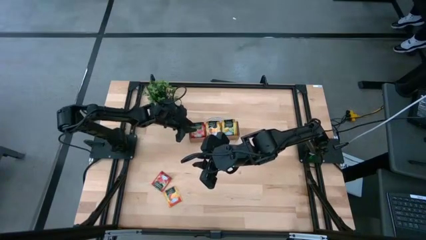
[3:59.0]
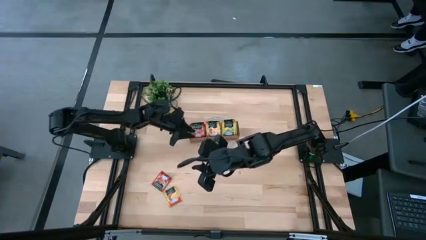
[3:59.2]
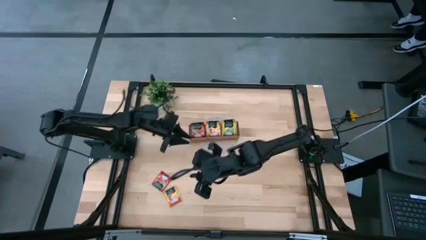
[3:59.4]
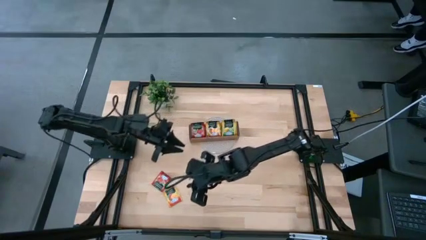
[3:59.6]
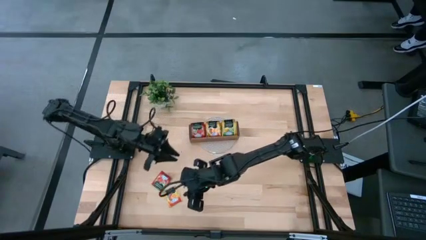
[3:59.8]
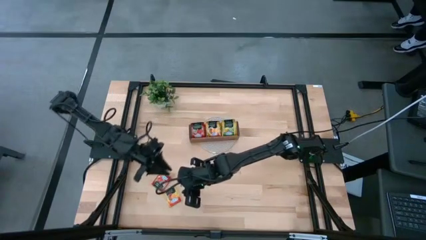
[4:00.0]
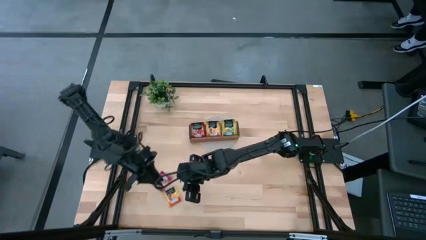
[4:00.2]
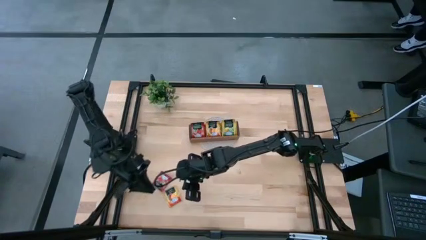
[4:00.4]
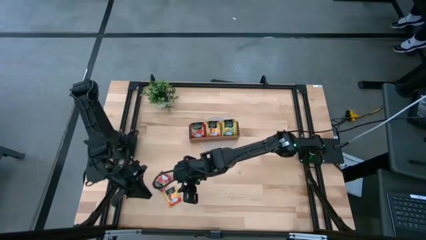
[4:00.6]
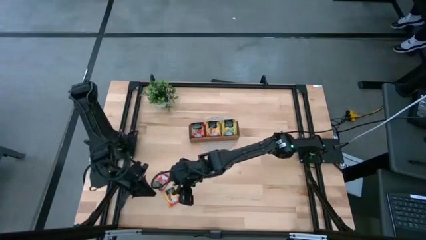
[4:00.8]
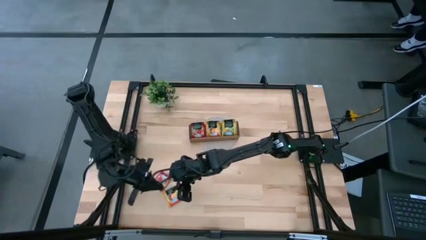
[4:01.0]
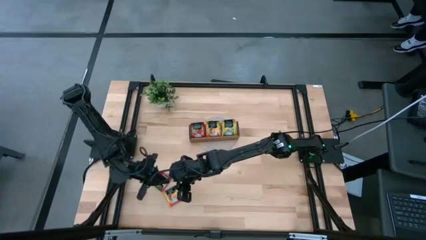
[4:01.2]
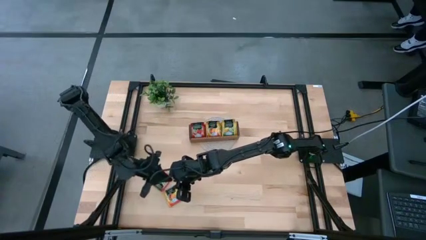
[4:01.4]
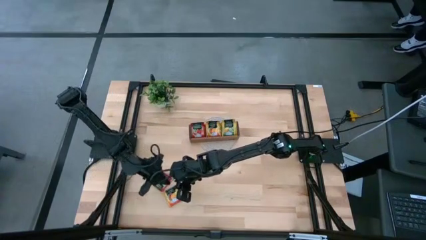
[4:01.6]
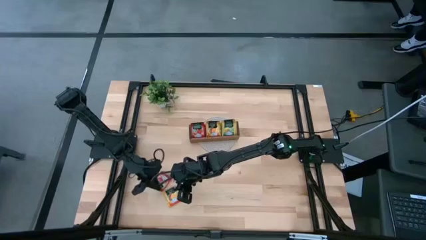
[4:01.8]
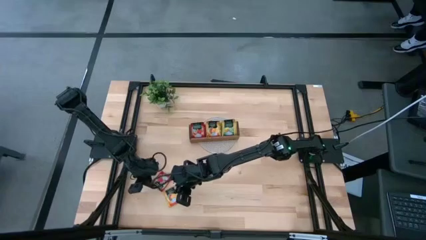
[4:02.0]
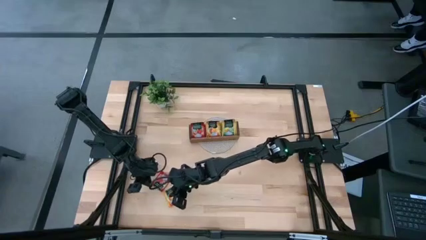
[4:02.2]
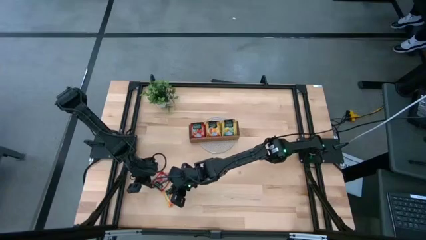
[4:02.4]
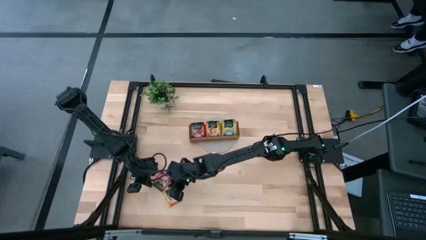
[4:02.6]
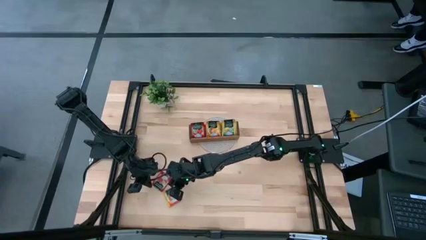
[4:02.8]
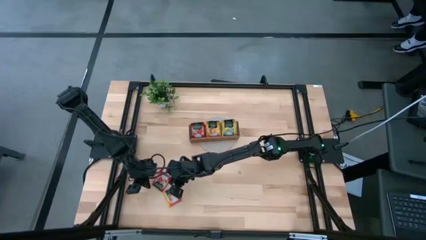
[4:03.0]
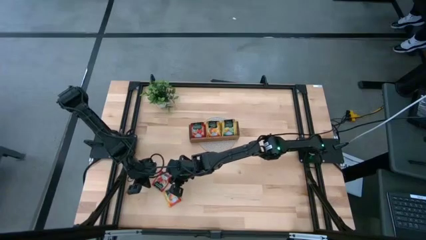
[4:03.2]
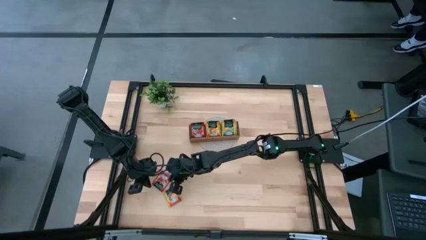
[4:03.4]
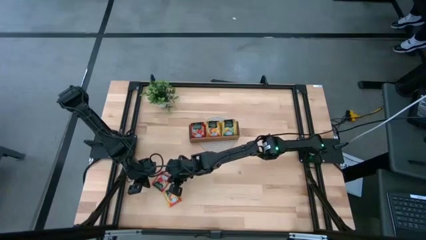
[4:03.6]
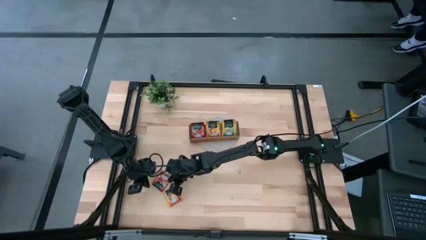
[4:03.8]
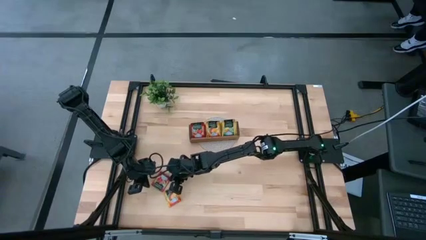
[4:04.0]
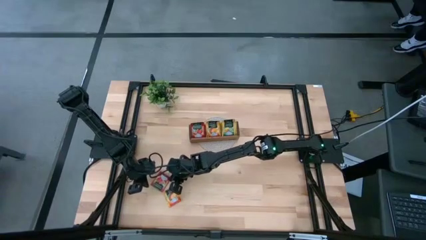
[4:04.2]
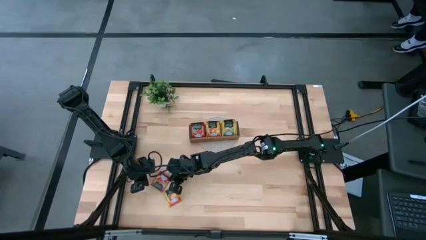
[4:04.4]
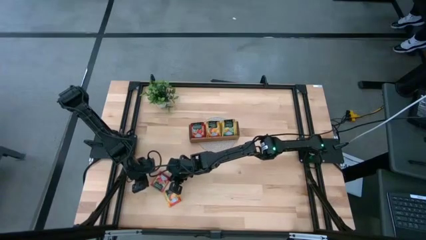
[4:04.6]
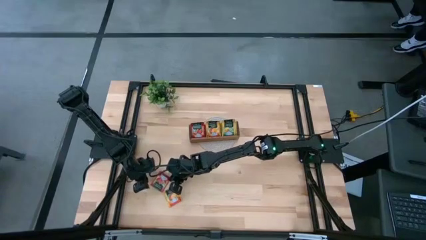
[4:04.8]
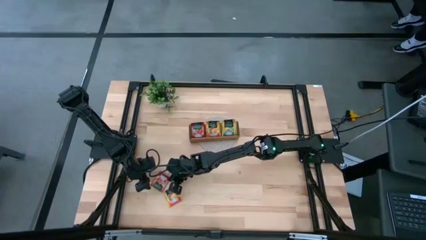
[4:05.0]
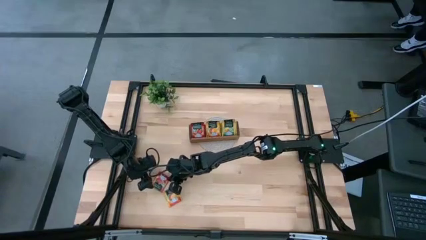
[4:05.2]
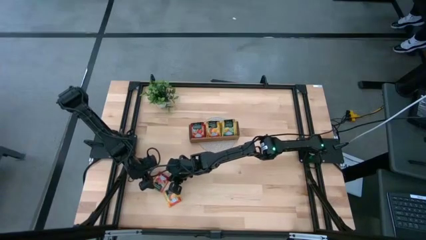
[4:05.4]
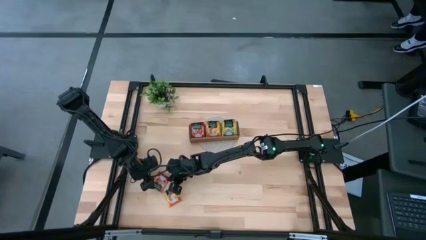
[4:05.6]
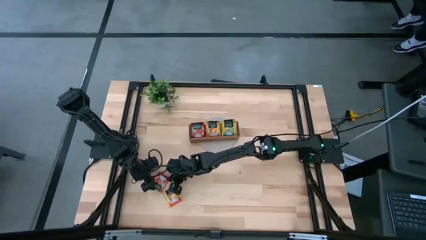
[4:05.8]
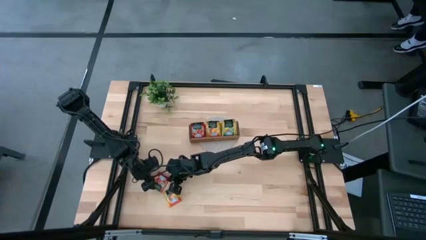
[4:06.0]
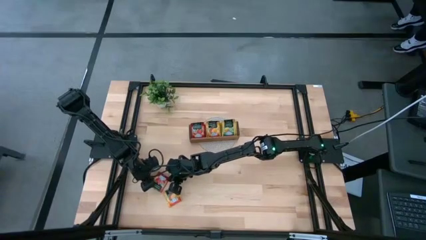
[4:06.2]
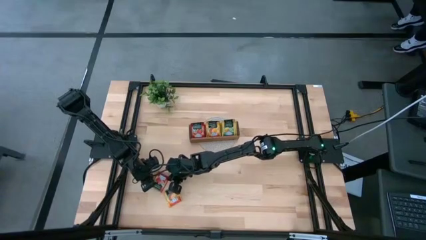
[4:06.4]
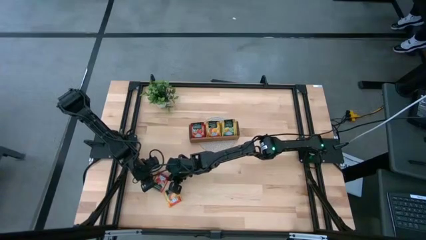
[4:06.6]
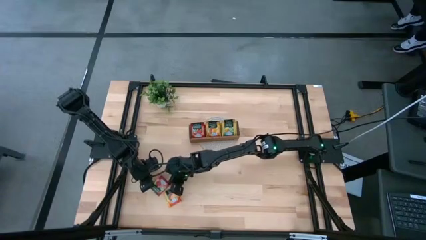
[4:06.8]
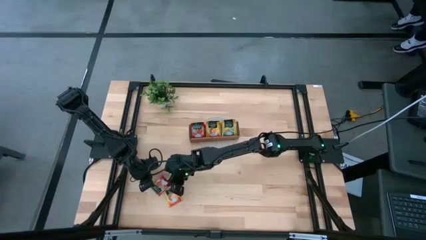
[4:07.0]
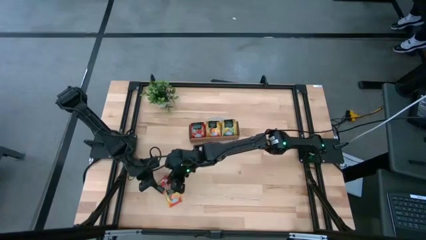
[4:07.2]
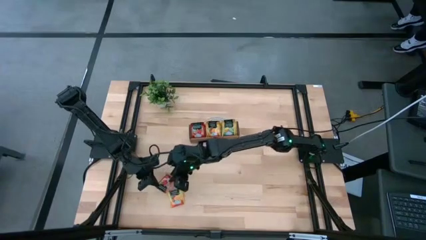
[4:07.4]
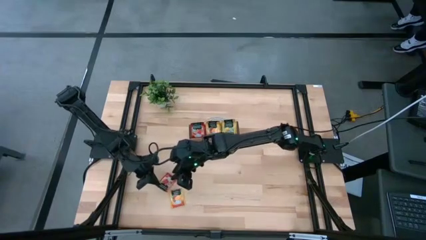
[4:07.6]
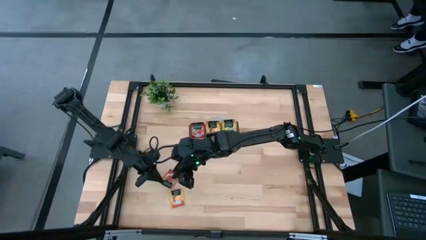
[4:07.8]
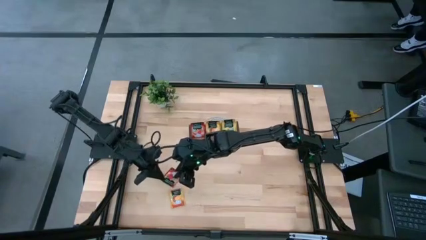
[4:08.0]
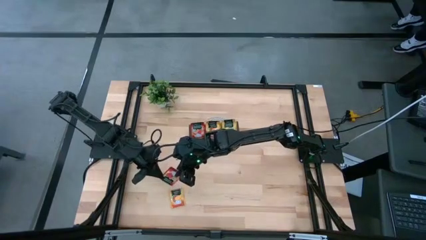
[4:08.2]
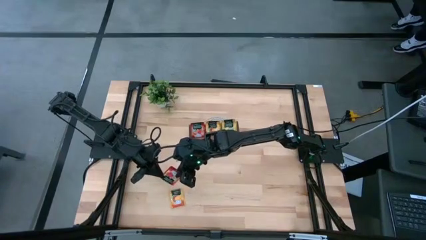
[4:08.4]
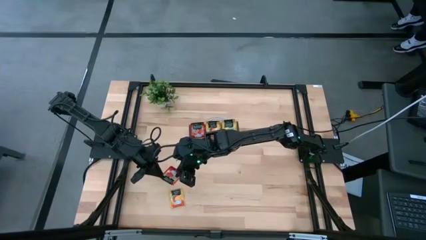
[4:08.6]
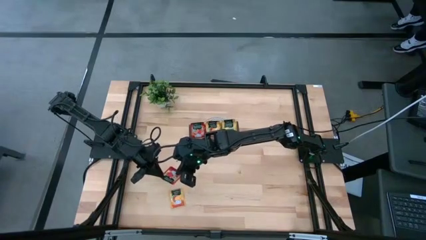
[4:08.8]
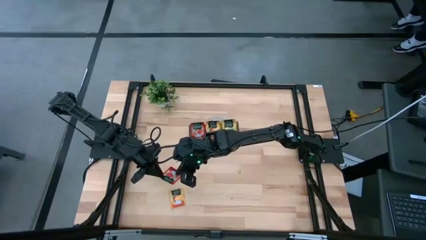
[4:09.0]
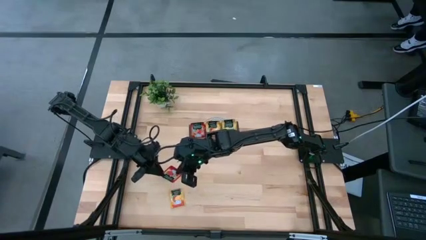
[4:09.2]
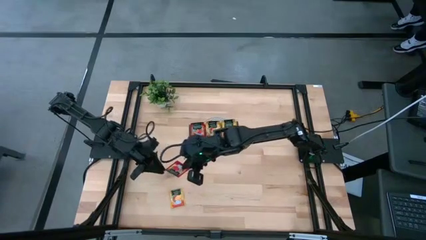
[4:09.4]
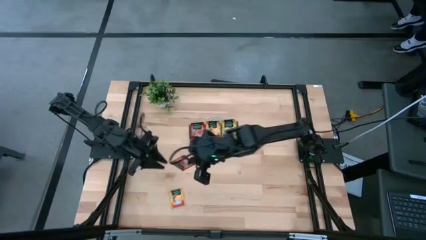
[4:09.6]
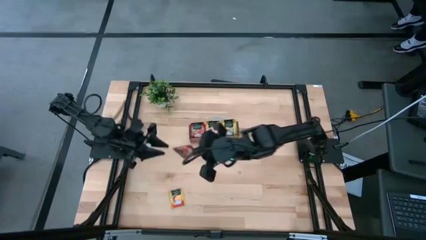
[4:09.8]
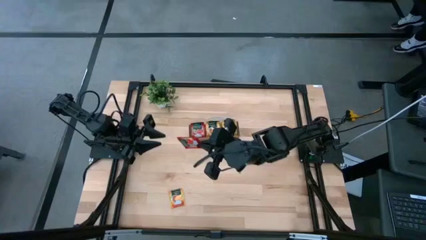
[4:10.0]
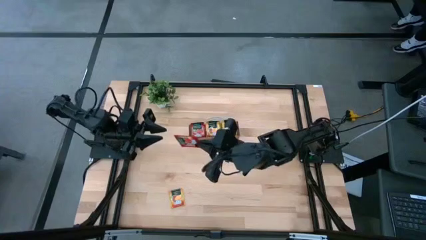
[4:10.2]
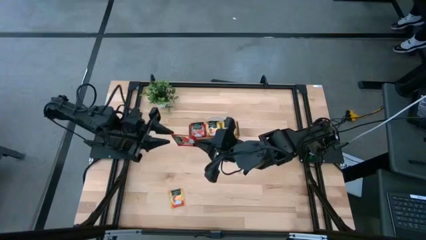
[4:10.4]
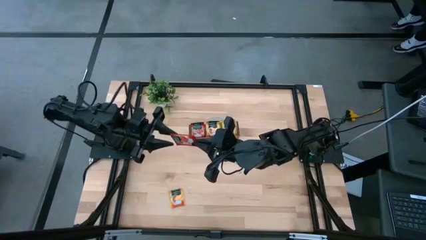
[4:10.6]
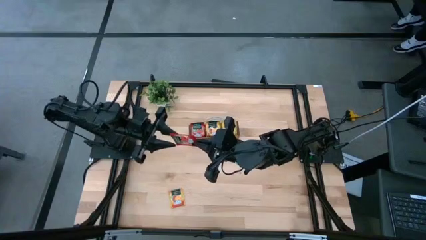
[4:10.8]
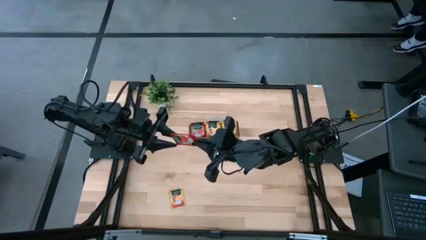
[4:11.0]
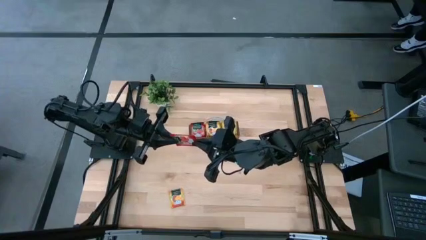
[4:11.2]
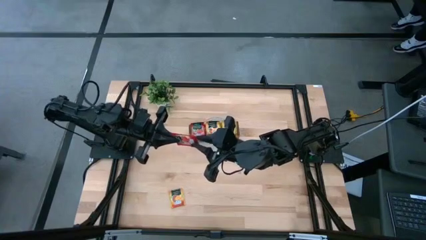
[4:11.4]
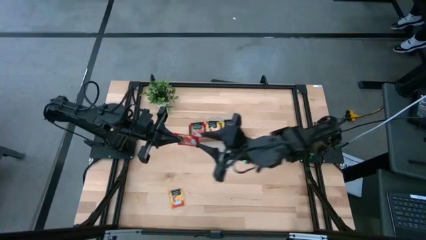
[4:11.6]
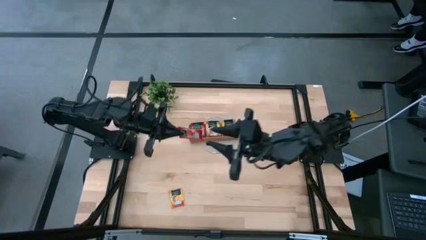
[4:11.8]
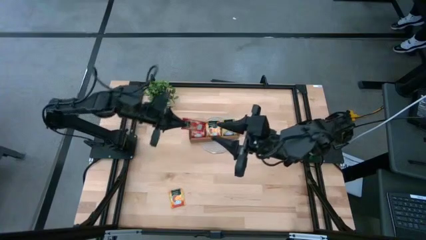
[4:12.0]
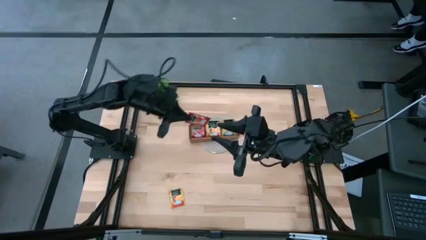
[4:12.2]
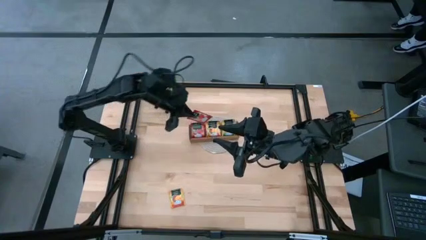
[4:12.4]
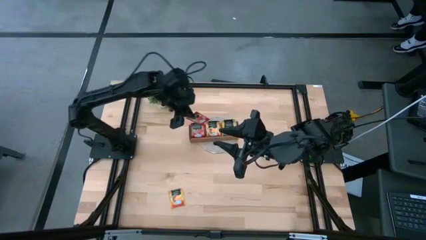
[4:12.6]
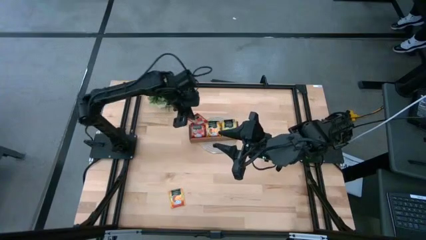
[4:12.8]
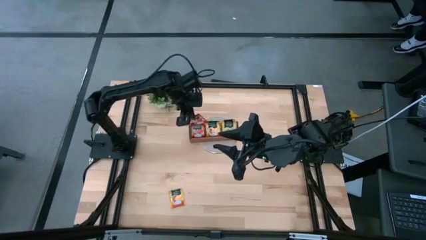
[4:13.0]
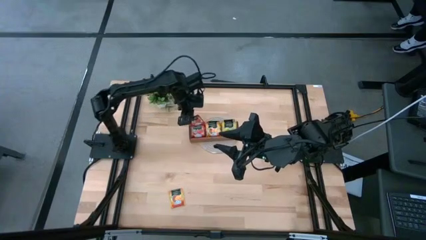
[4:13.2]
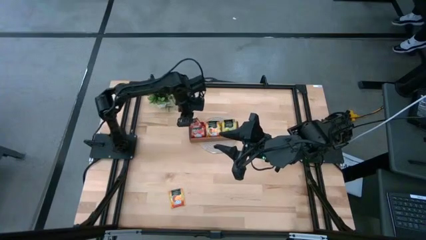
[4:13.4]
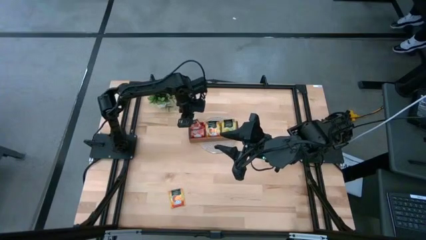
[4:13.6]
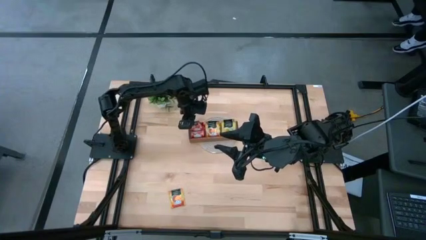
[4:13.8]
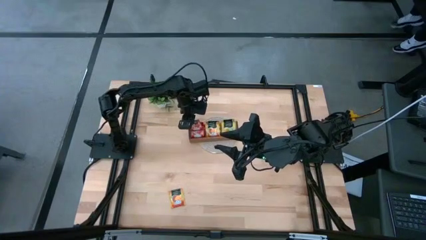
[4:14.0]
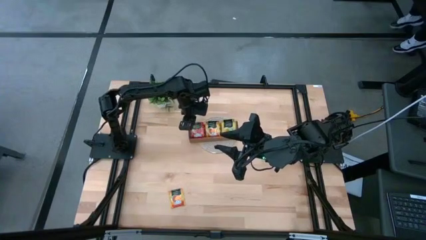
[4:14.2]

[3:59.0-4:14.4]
Task: Pick & Place Tea
Put the red tea bag into the left section of the wooden organizer

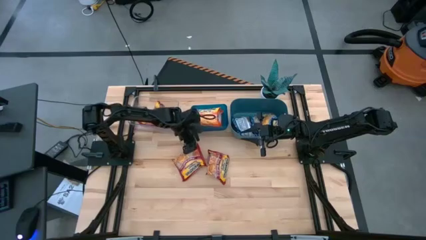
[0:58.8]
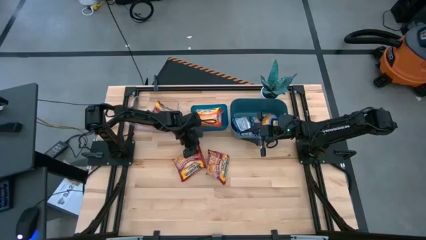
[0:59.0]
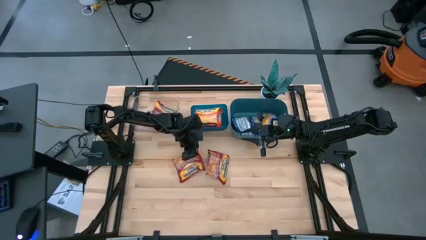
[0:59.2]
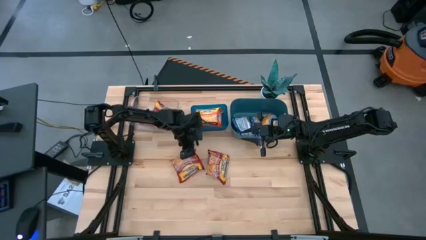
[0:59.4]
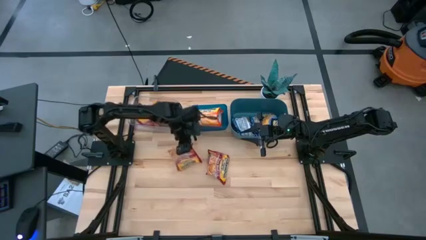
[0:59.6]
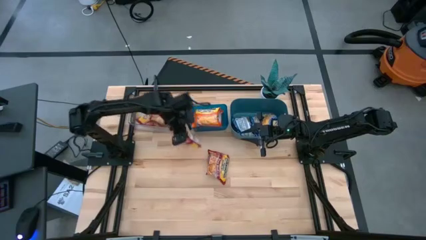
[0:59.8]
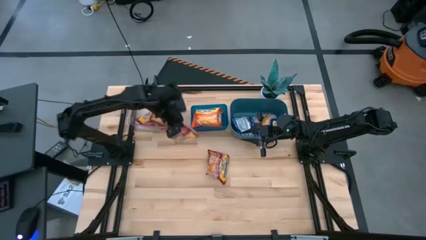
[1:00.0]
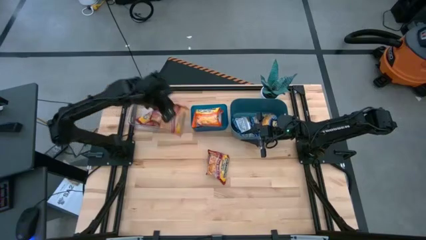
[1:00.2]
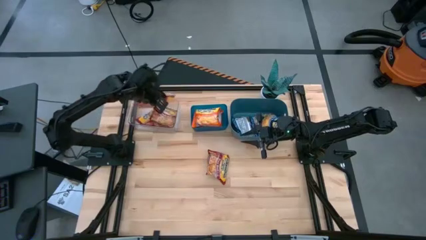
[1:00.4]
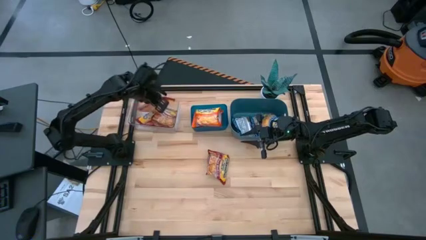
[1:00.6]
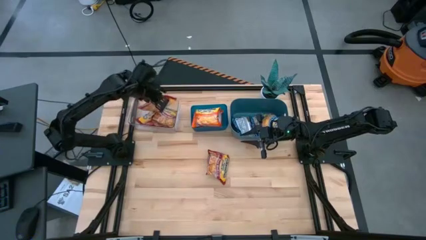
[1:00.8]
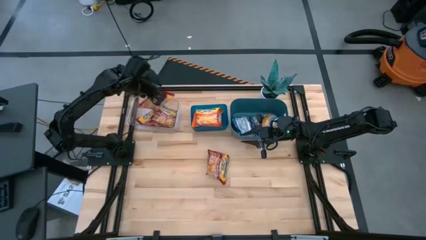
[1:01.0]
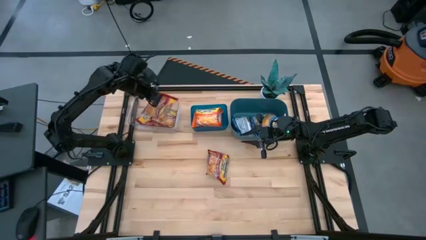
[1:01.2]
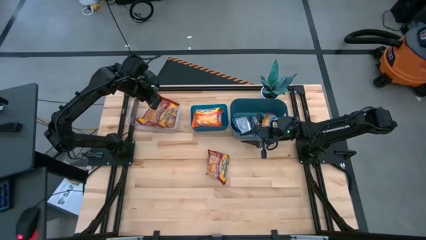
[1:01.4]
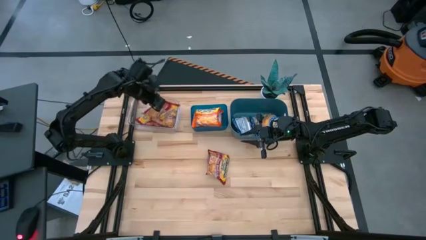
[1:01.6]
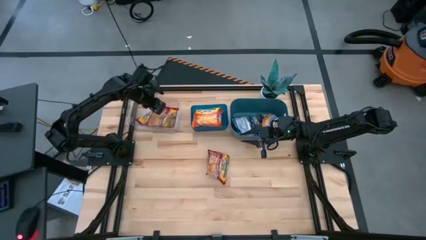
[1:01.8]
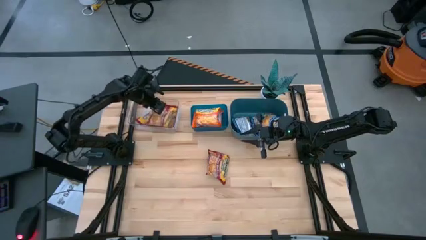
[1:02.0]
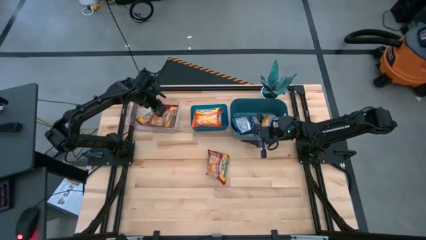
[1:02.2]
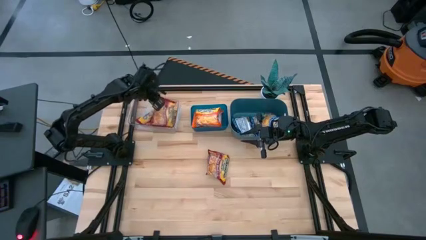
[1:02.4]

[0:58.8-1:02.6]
Task: Sort Maruchan noodles
Put the red noodle pack into the transparent bin
